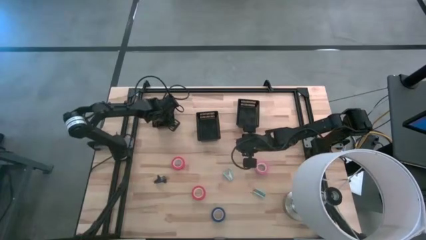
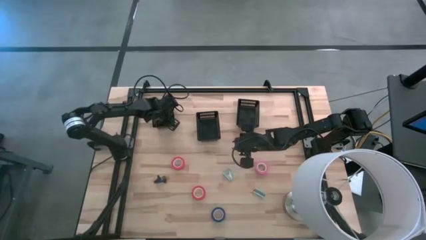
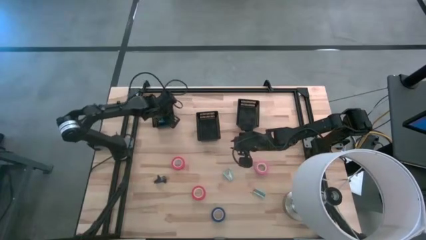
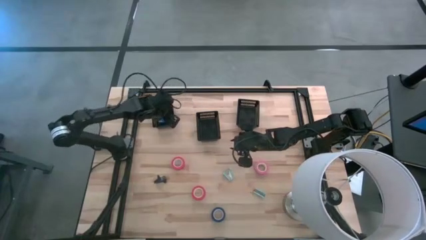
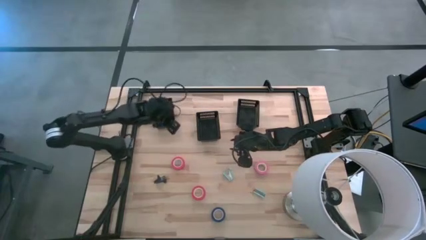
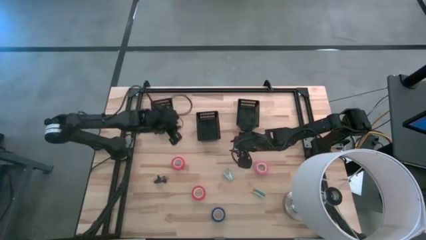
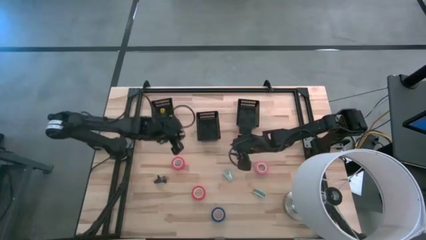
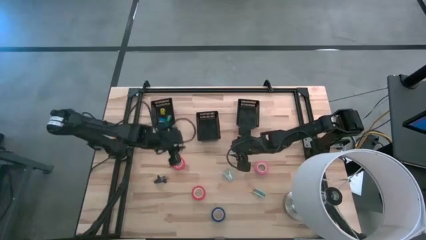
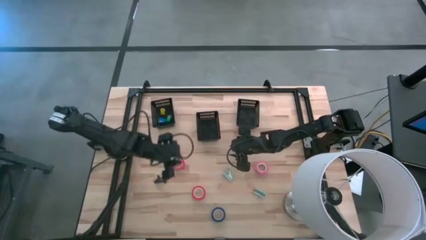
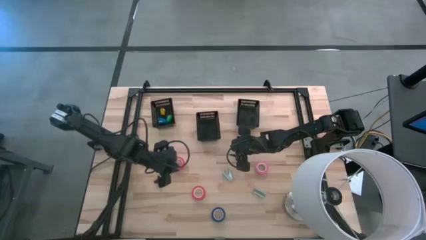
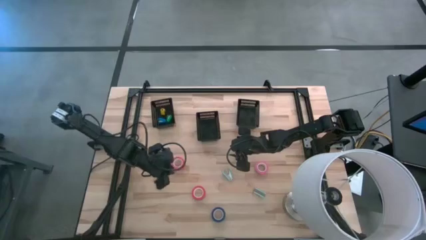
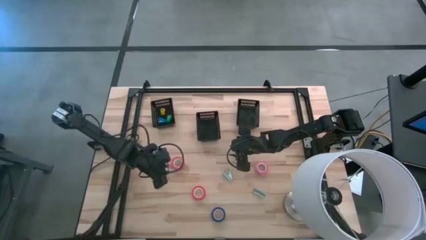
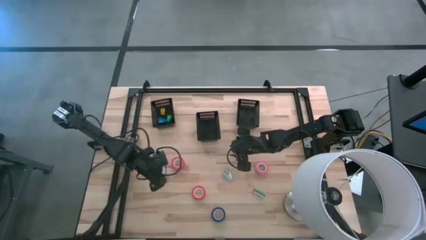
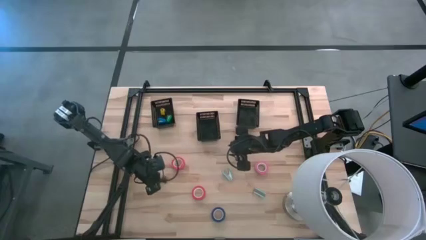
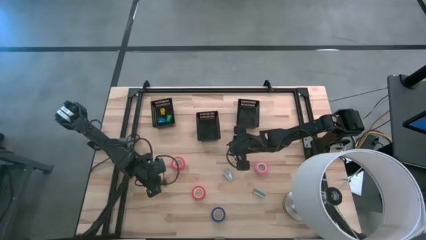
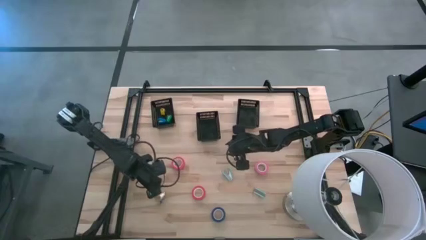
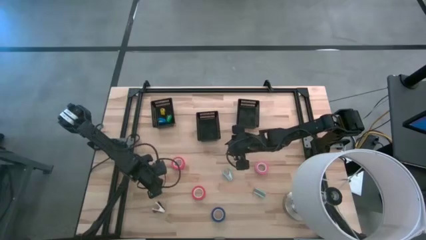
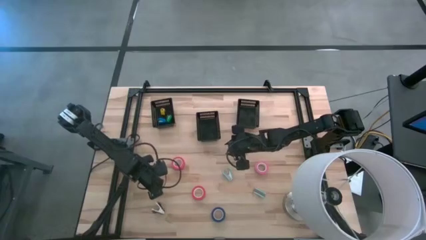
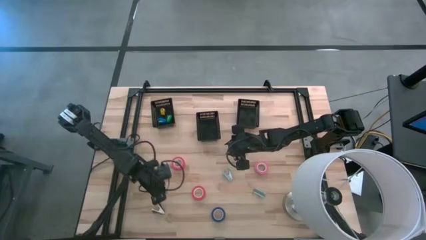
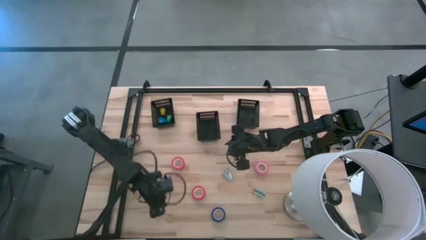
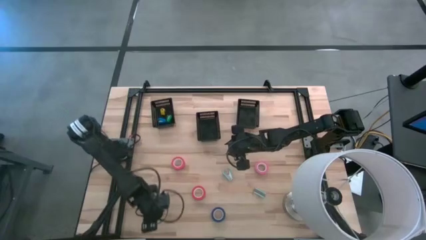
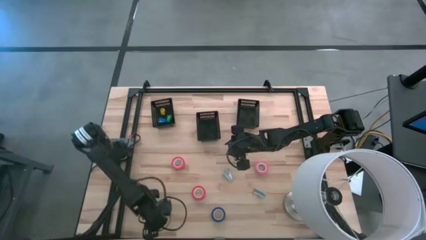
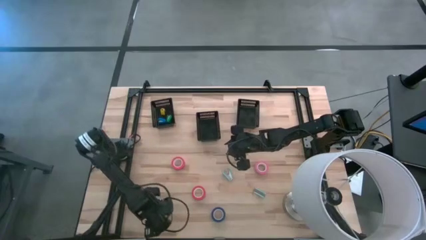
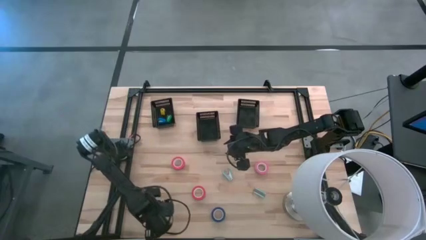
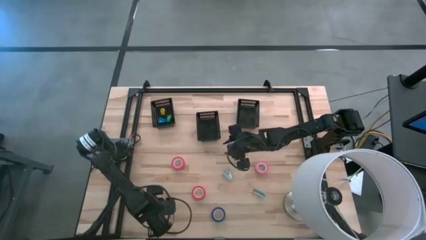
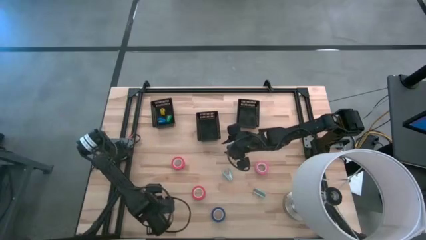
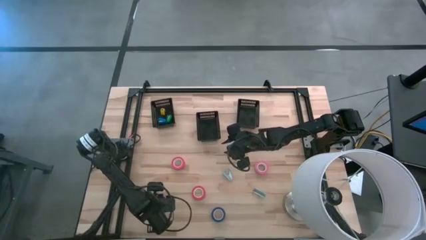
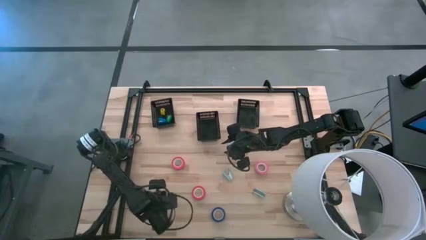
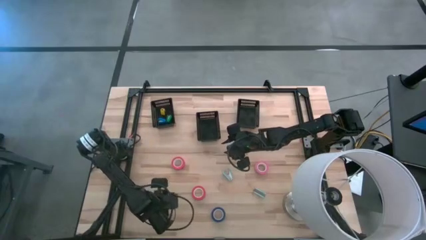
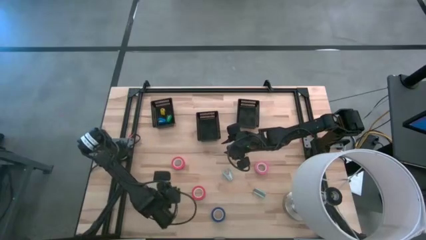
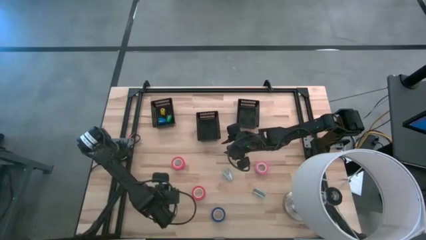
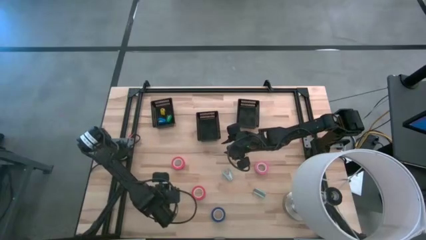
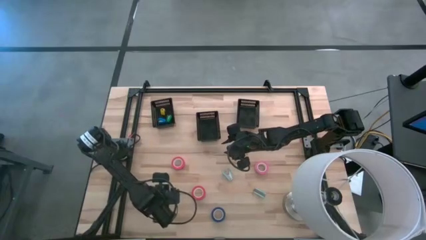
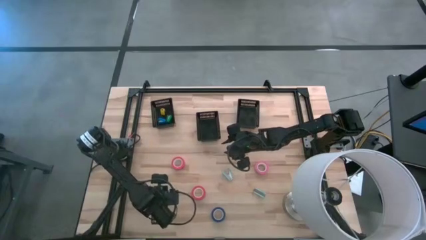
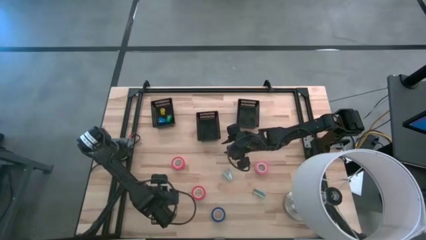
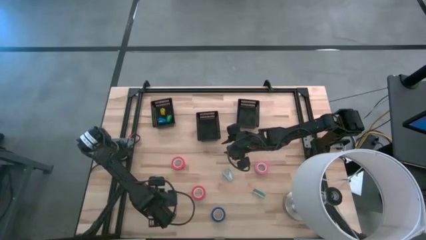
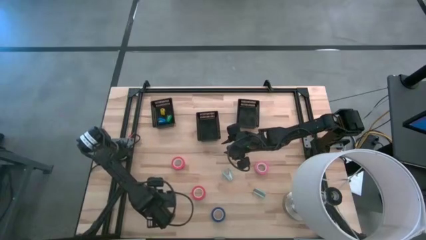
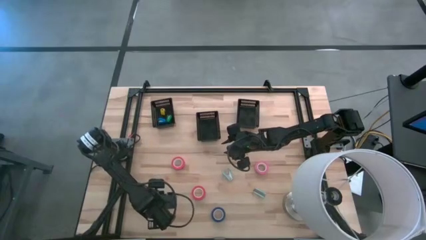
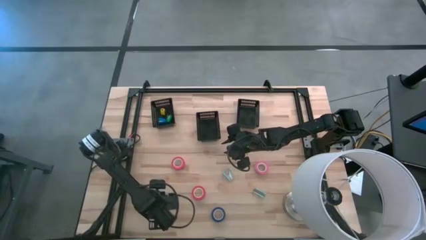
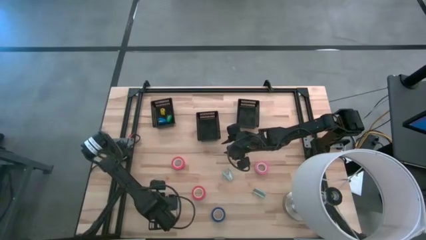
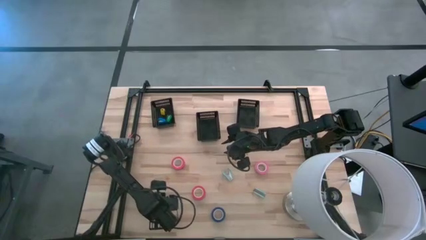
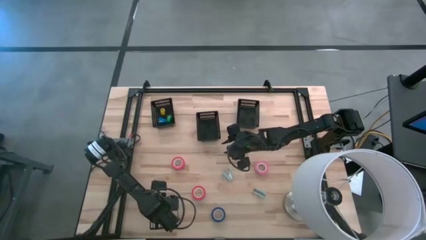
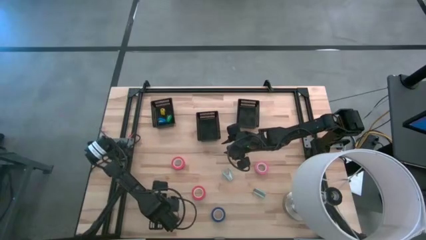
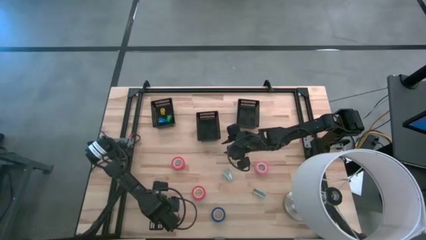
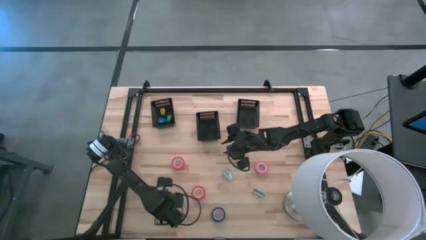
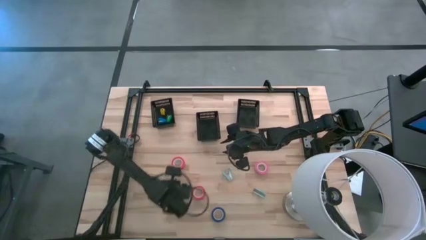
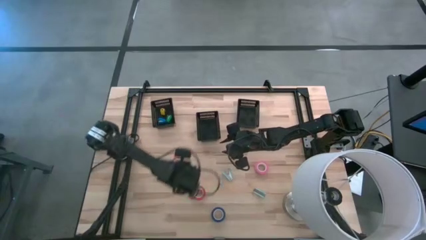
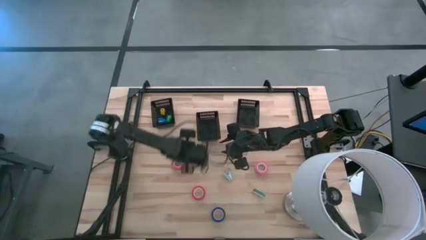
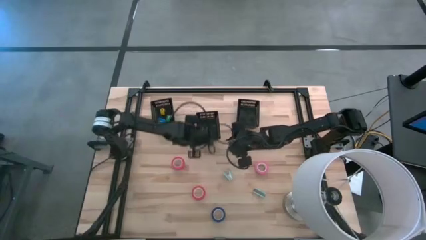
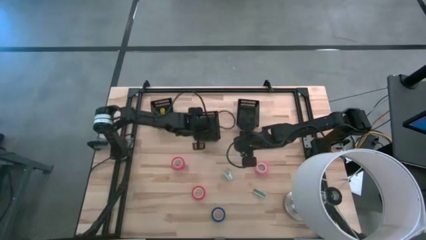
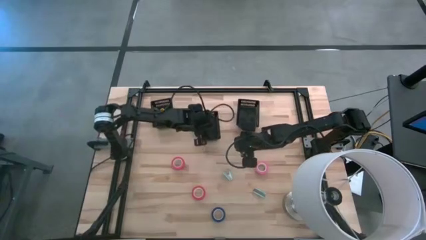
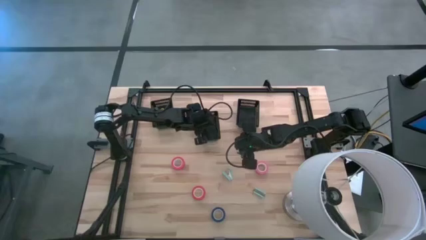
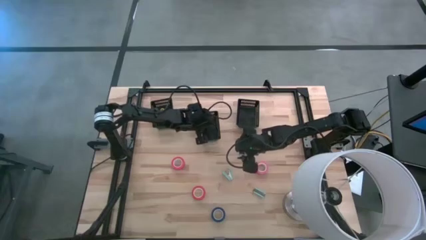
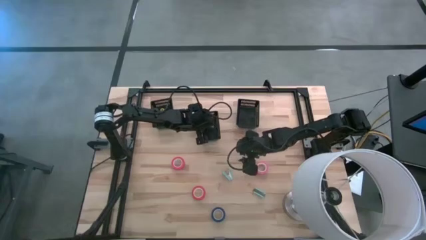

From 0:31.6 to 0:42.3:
Task: Pick and place Stapler, Stapler remover, tape
Put the black staple remover into the middle black bin

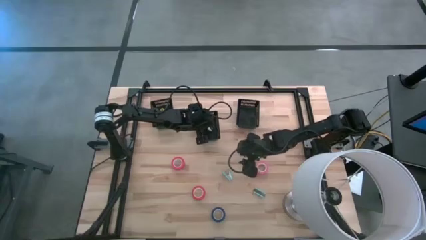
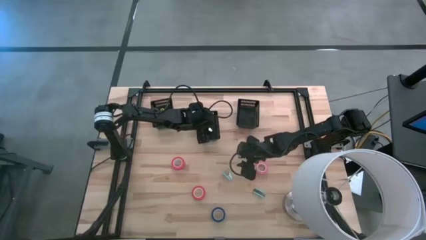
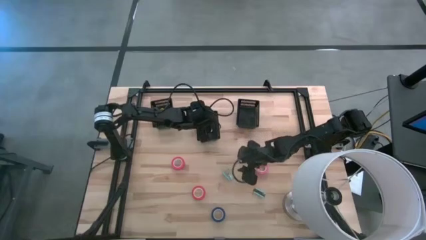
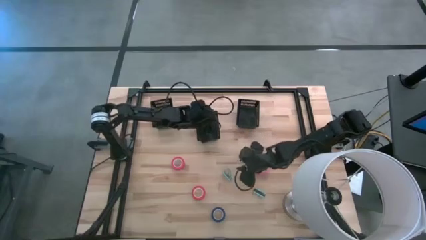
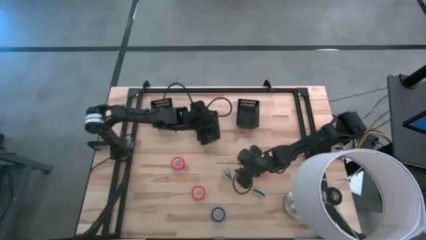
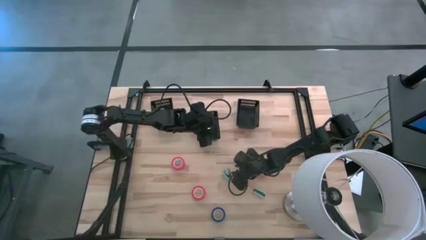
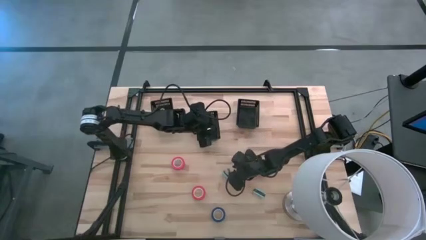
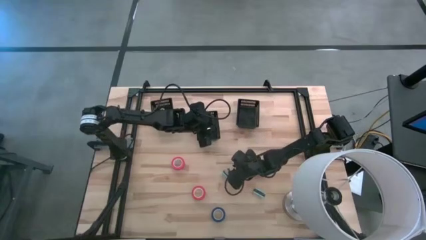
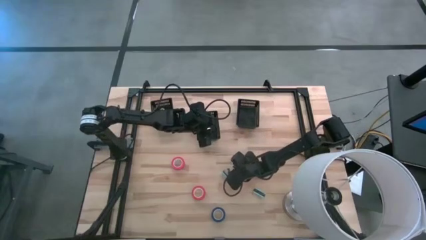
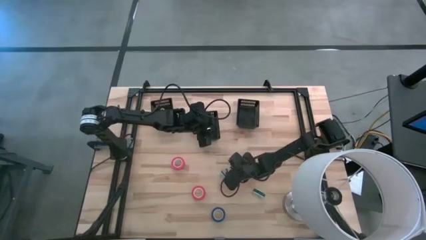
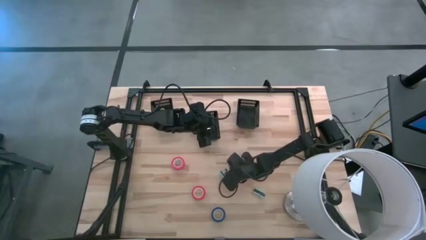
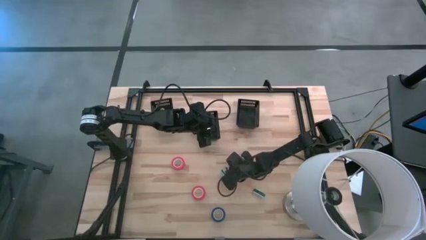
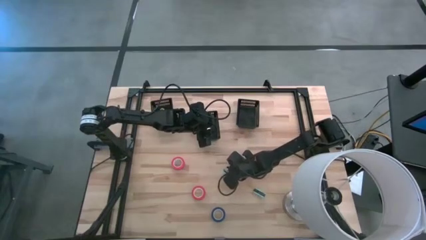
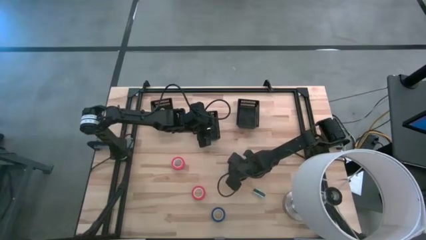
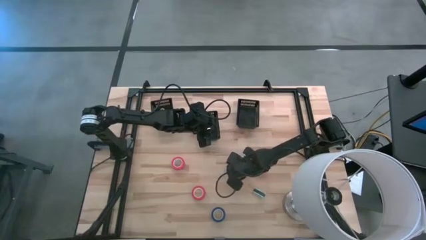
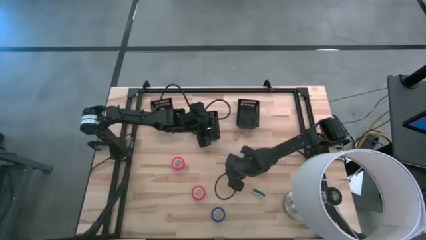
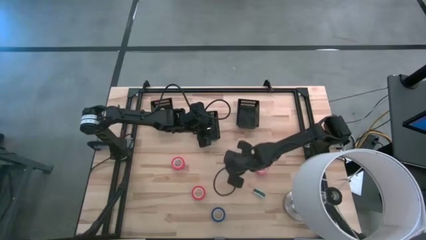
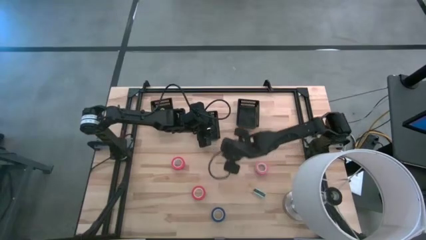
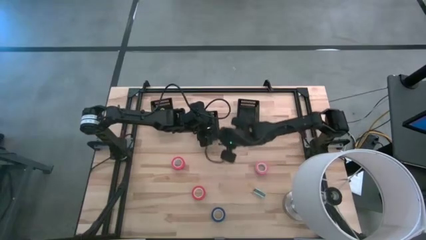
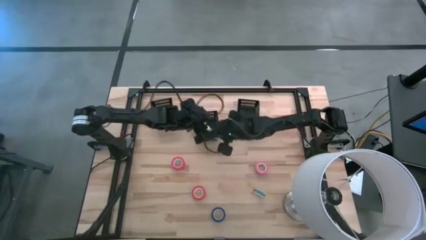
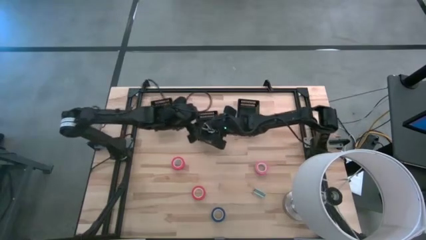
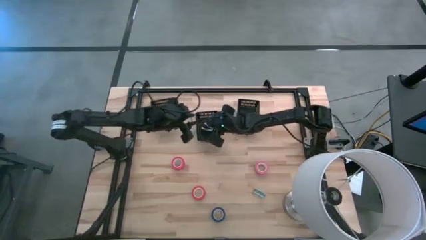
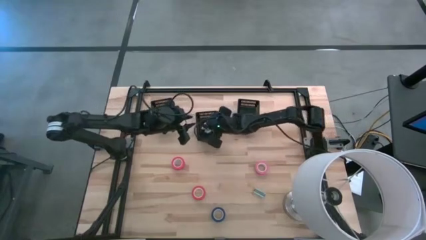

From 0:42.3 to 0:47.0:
Put the top blue staple remover into the middle black bin

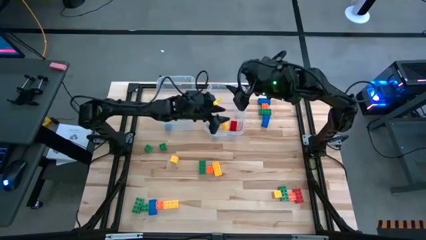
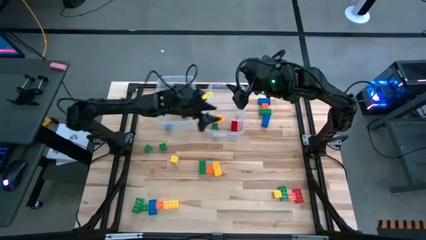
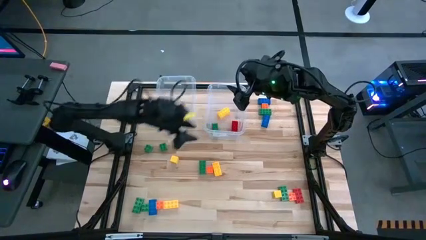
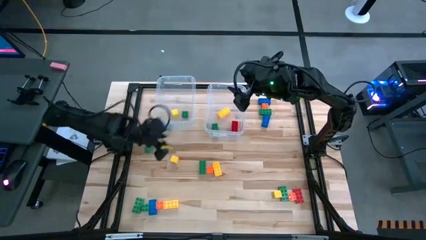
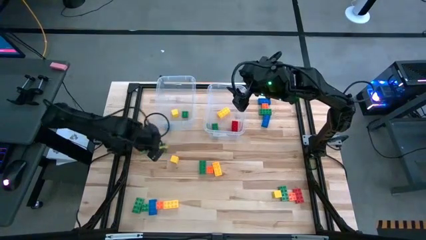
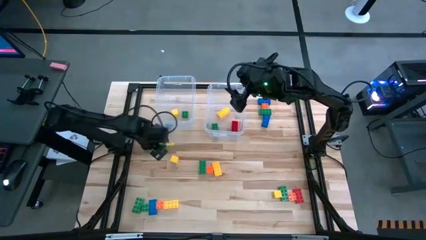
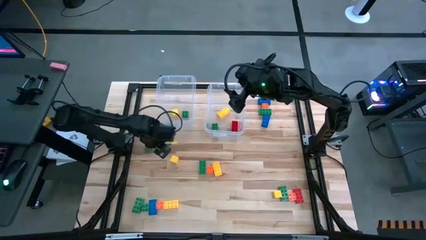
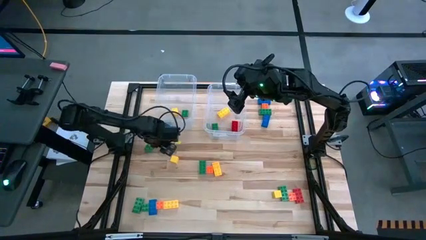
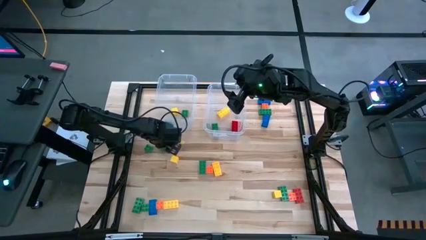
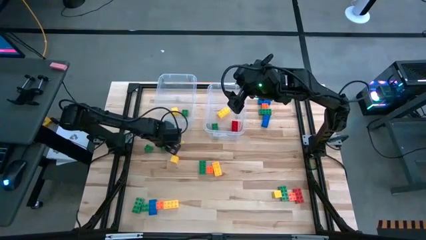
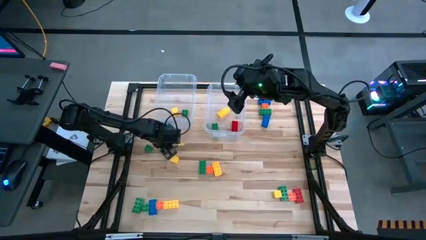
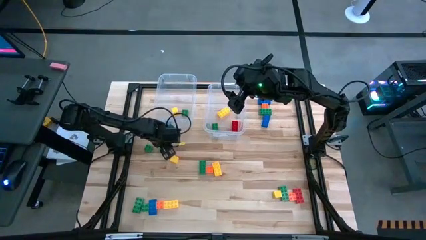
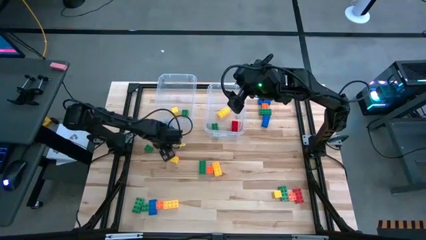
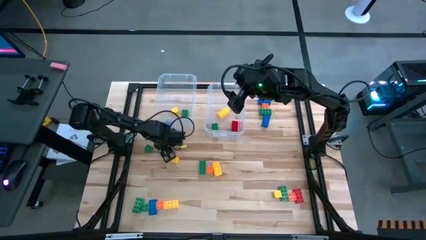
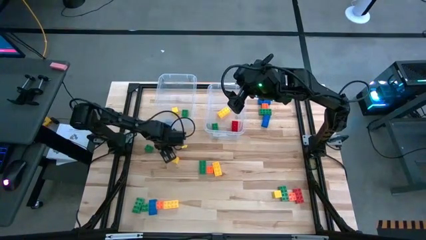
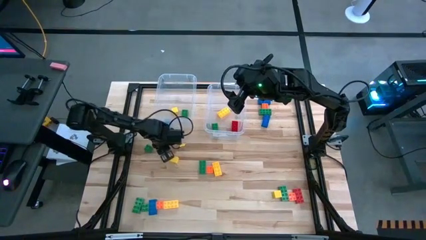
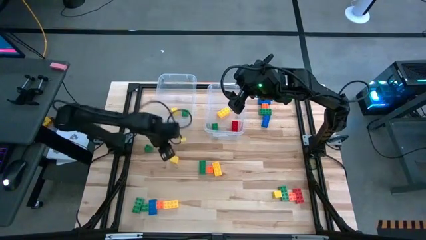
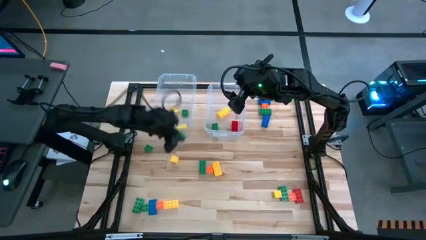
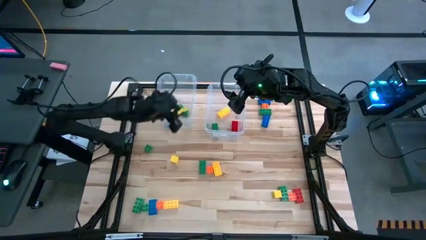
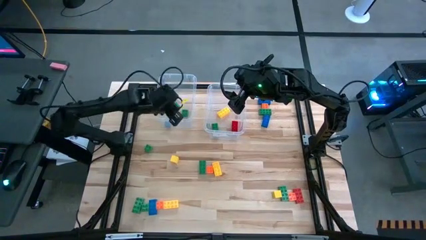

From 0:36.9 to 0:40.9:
Task: Sort blocks by size
Put the green small game piece into the left transparent bin
